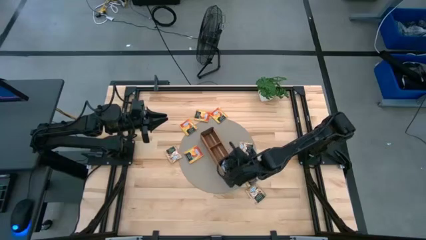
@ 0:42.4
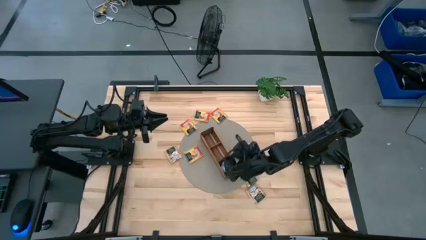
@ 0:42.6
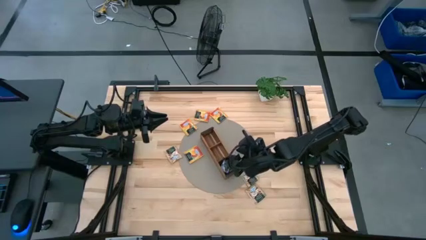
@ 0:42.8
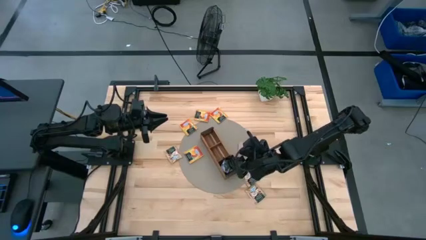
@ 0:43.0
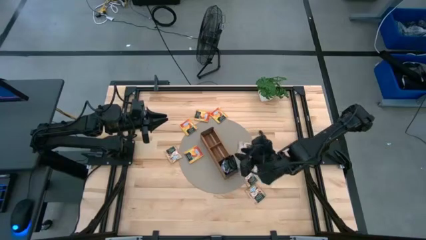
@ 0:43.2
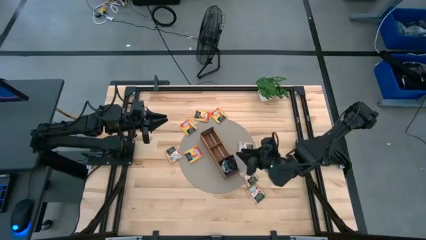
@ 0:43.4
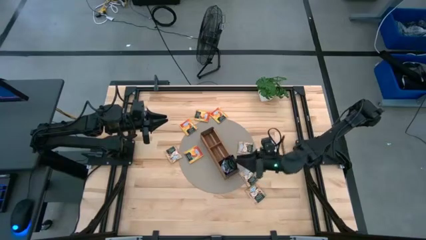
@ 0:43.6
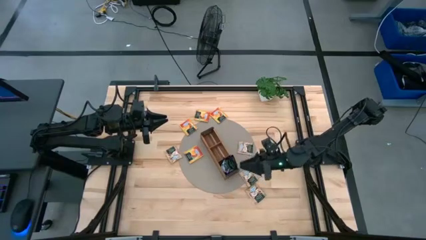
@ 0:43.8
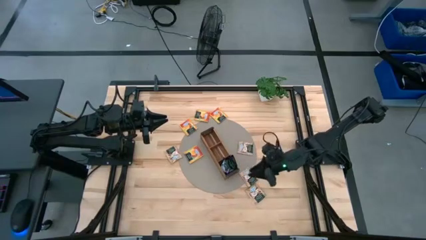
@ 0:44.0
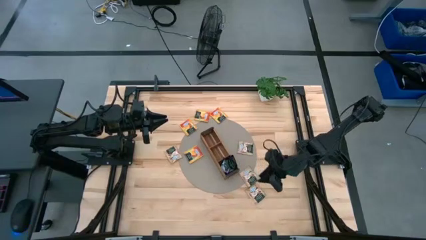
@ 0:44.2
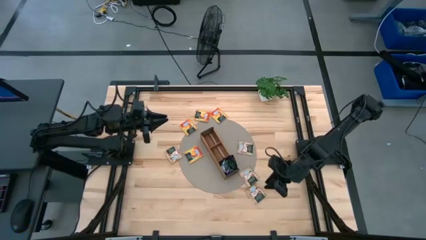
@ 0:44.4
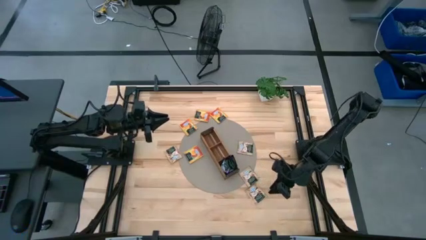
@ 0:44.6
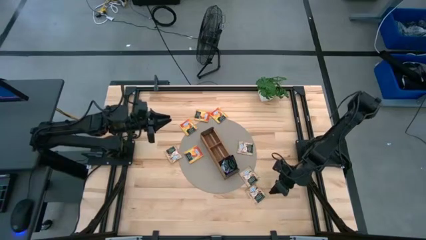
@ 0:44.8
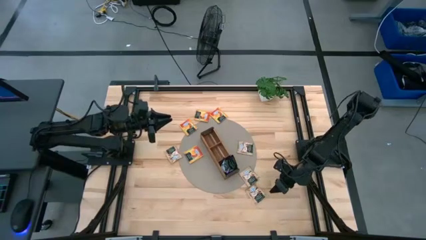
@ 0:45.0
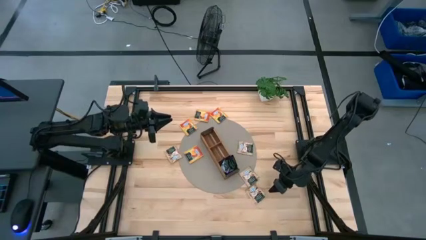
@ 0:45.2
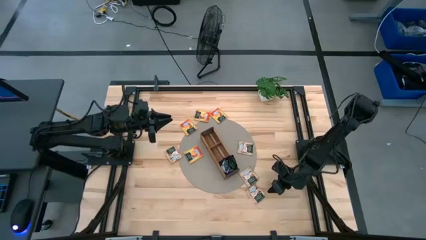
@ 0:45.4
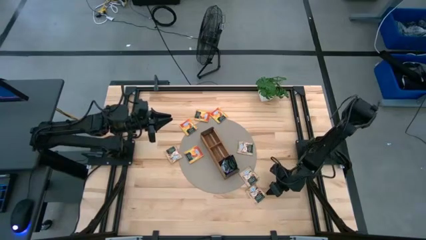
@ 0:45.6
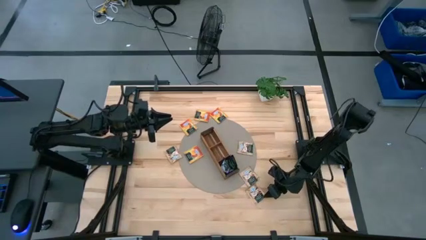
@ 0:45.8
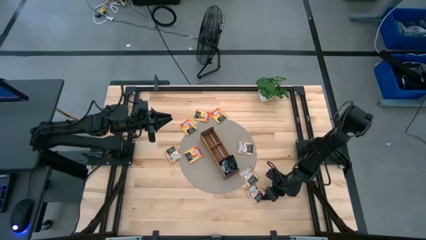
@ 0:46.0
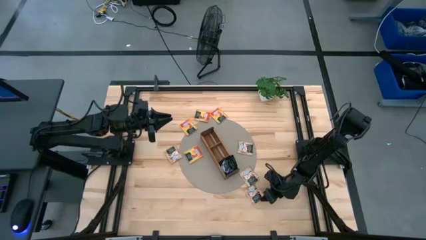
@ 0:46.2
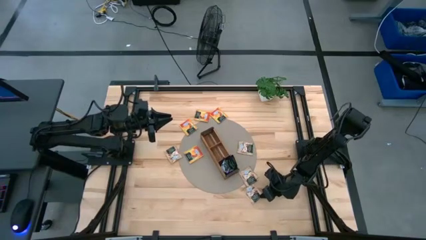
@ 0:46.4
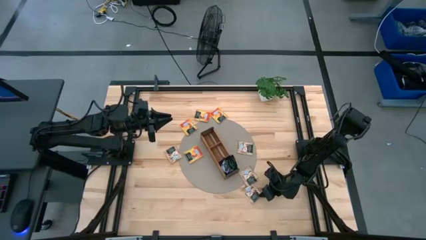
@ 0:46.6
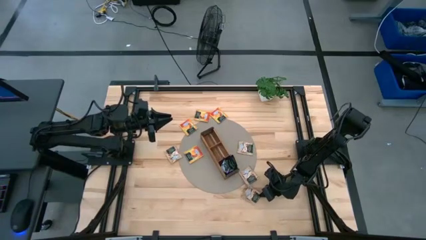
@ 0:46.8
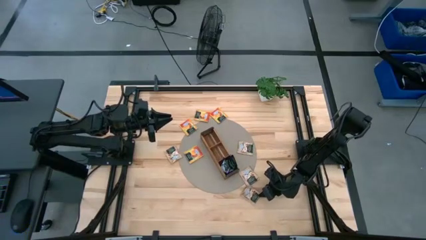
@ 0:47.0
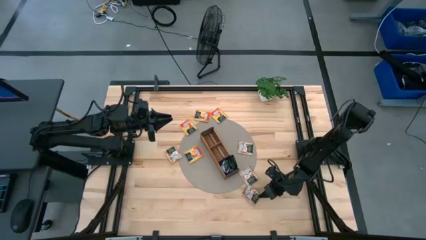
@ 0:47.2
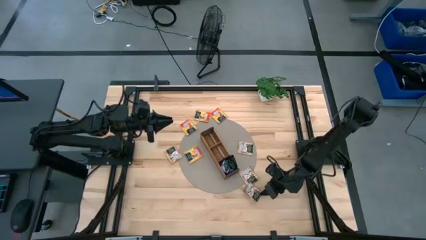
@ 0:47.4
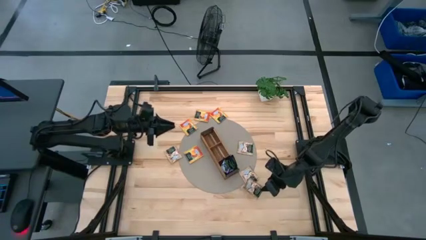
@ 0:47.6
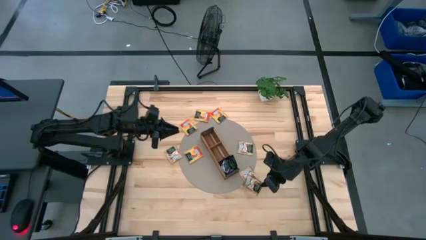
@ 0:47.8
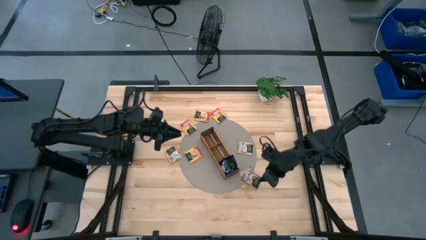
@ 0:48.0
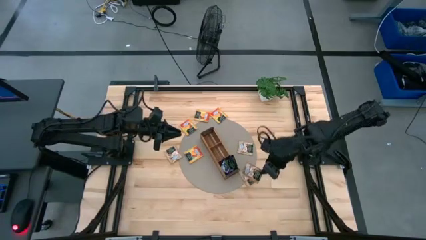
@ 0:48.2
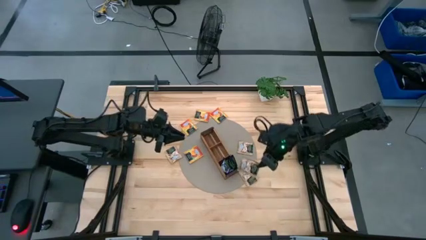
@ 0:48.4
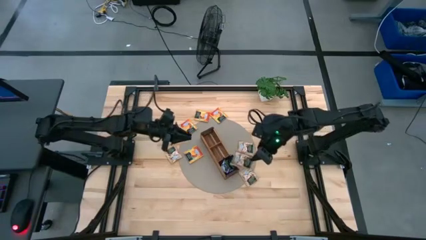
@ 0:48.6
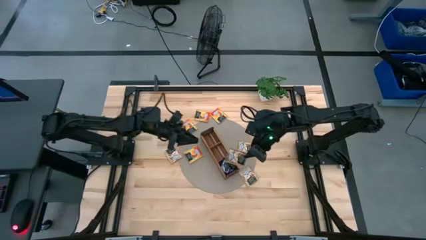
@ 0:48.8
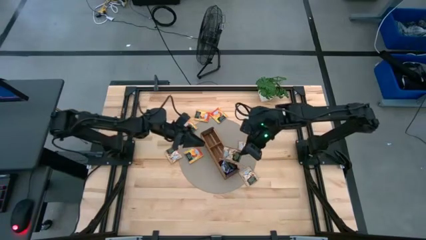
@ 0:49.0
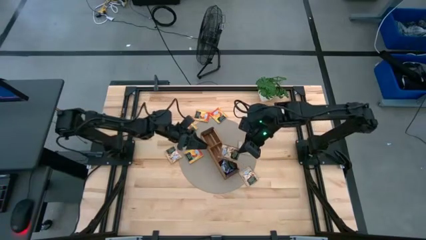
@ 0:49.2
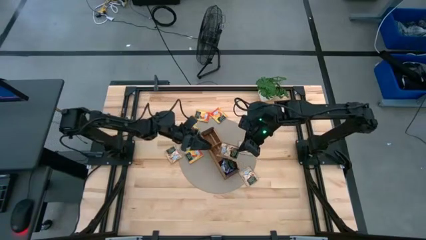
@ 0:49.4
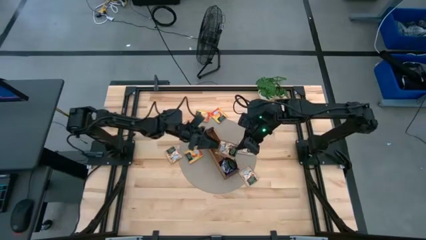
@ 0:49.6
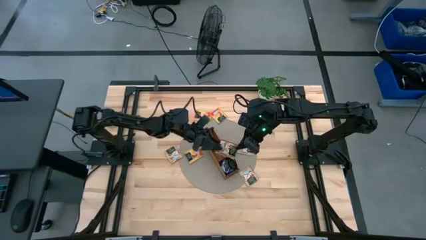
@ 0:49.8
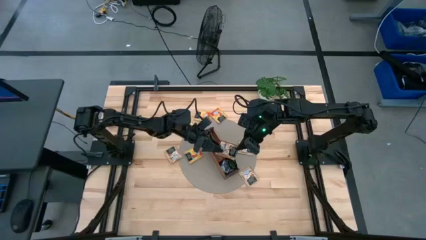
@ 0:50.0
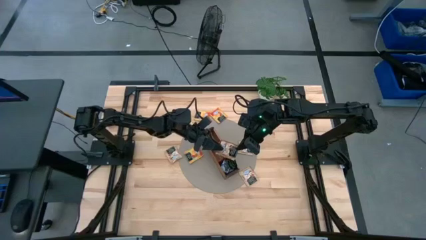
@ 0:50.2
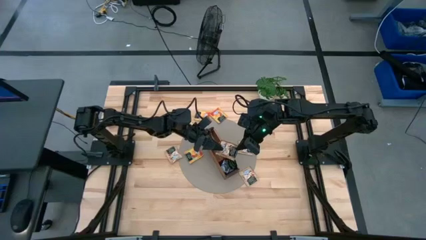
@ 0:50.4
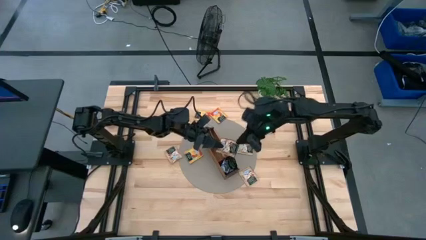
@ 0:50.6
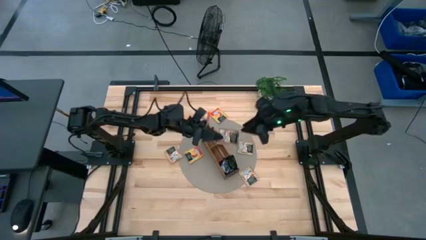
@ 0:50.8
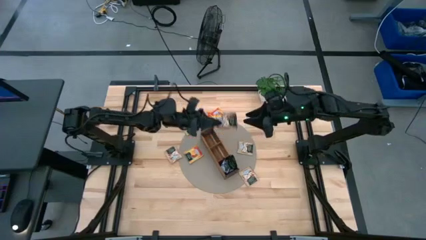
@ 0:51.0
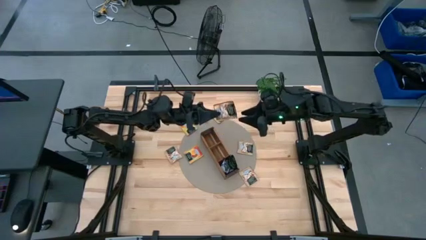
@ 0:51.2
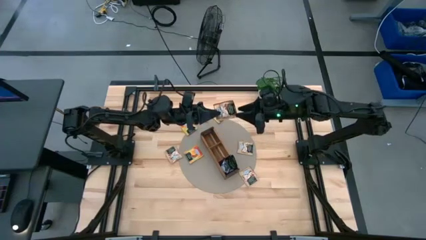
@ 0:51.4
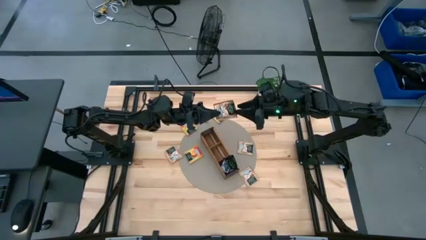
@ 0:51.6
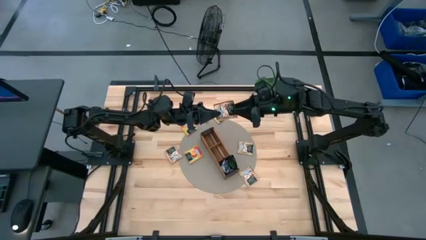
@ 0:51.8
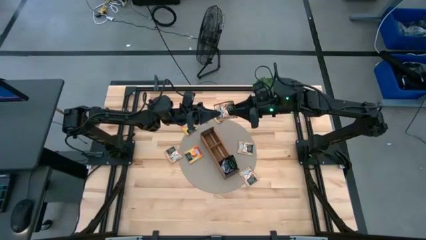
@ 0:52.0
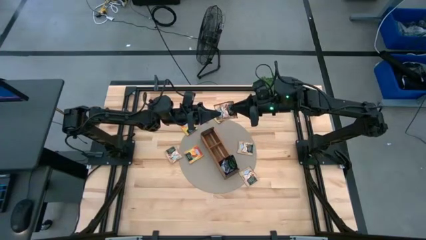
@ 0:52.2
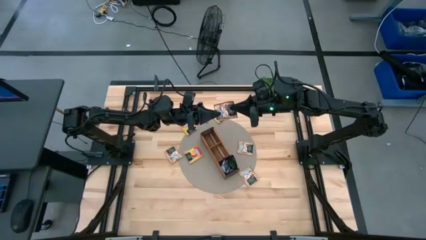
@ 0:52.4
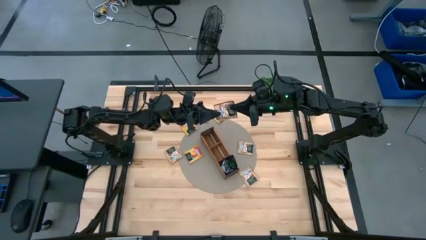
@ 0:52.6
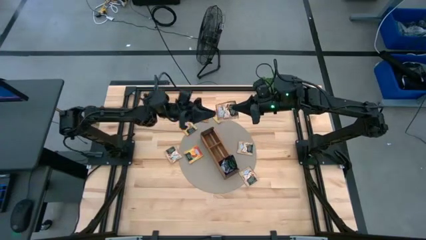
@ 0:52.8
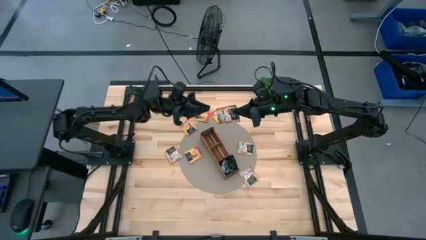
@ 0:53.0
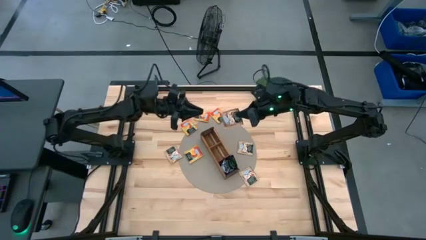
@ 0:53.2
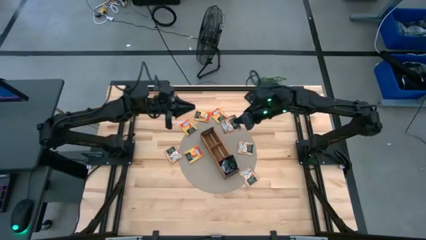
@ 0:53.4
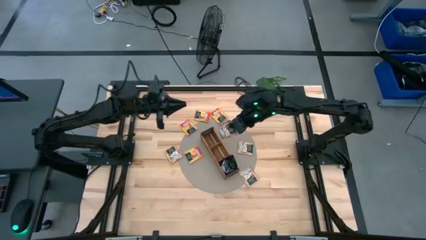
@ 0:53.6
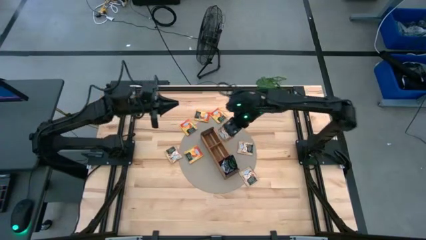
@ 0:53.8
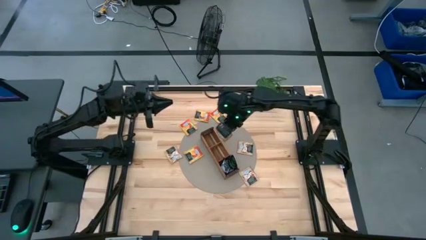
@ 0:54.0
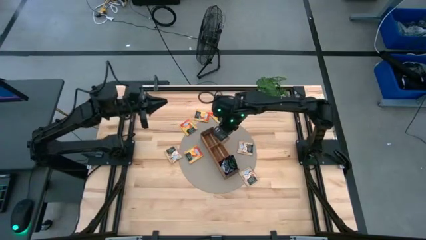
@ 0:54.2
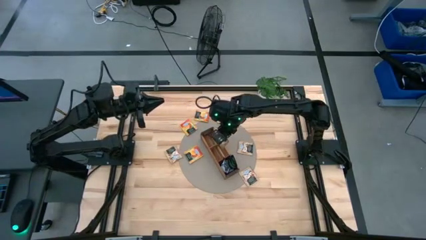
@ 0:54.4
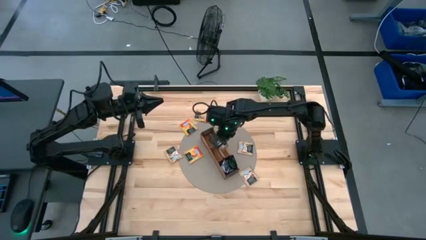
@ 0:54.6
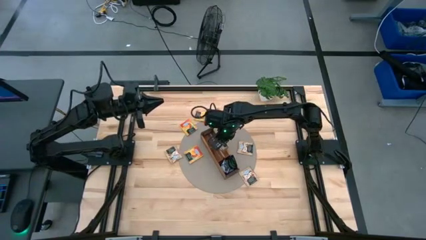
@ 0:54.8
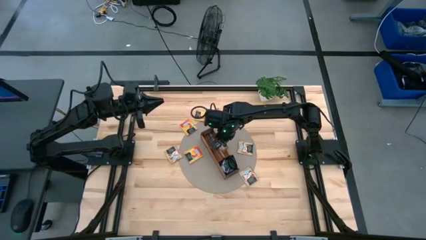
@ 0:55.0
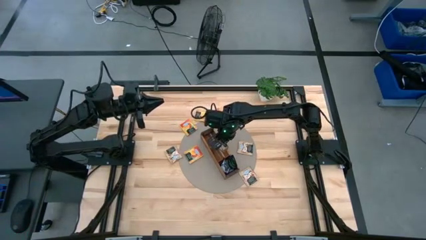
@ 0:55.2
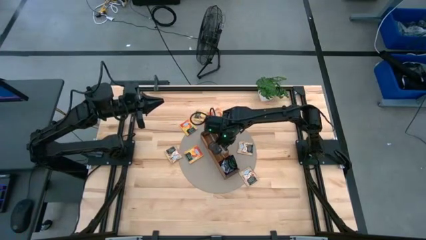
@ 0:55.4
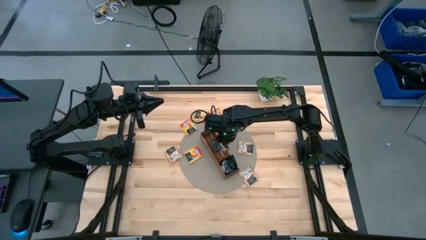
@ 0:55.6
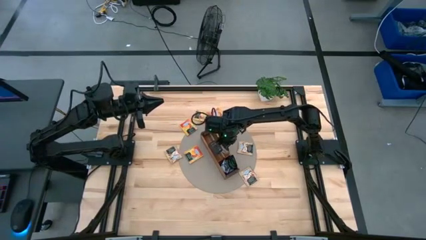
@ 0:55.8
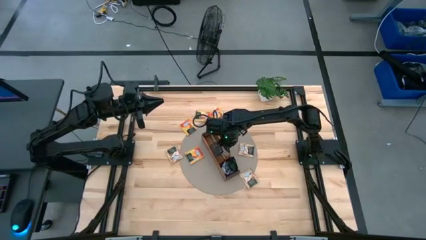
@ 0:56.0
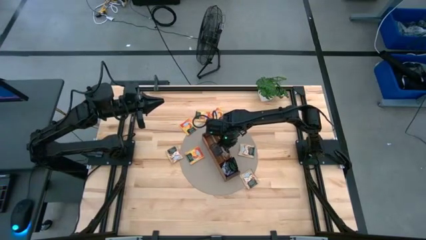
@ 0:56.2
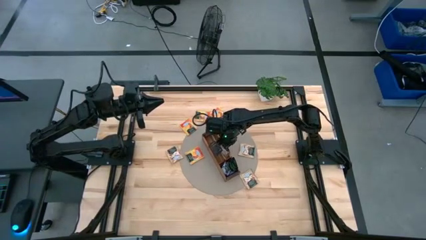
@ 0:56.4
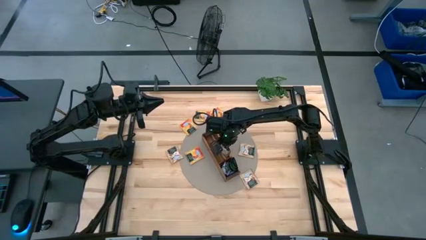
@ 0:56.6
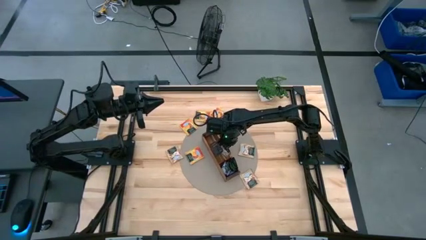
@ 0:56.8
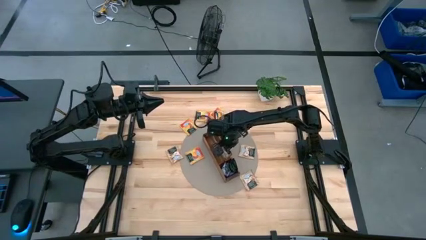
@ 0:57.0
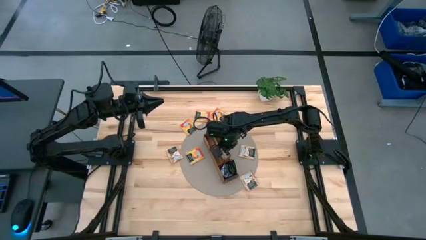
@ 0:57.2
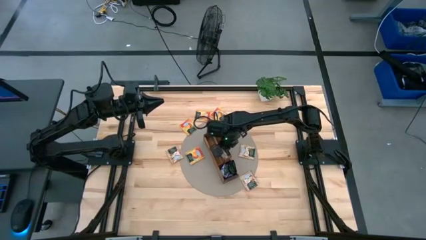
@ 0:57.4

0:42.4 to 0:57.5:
Task: Pick & Place Tea
Put the brown tea bag into the middle section of the wooden organizer

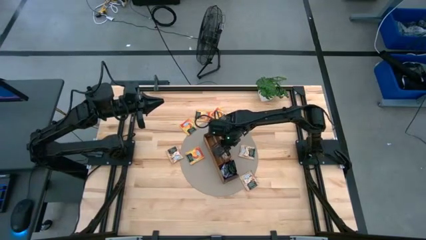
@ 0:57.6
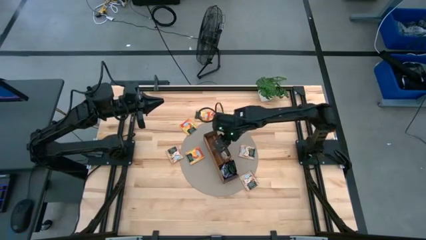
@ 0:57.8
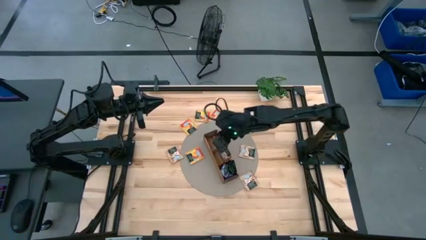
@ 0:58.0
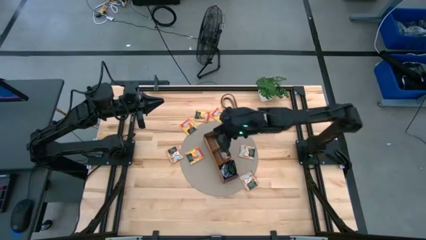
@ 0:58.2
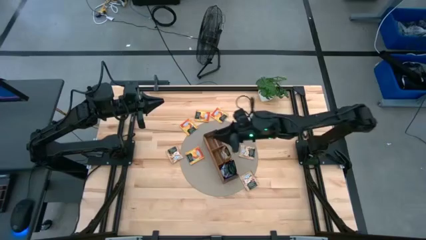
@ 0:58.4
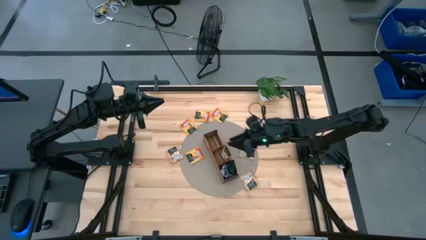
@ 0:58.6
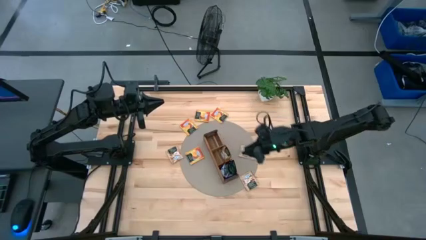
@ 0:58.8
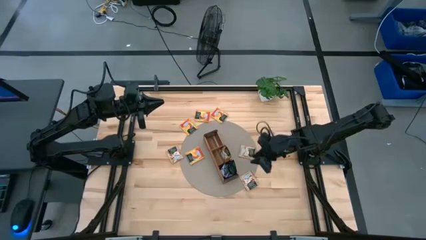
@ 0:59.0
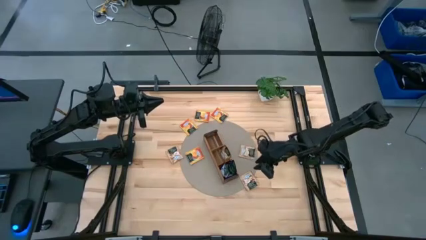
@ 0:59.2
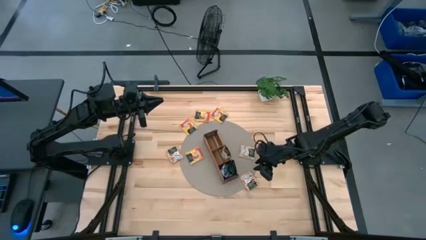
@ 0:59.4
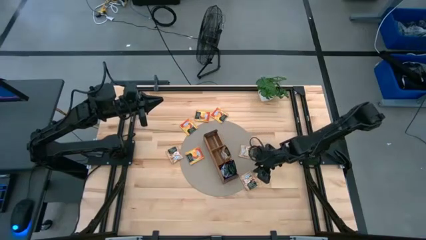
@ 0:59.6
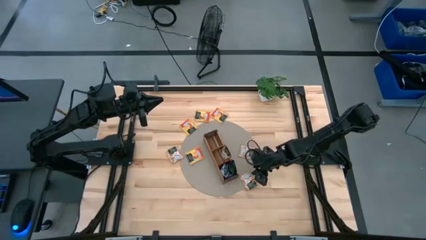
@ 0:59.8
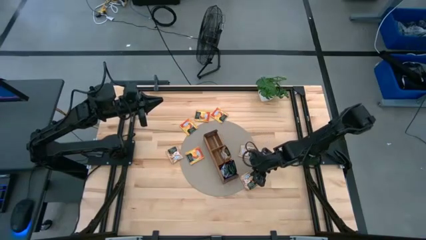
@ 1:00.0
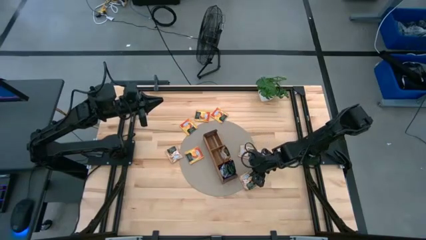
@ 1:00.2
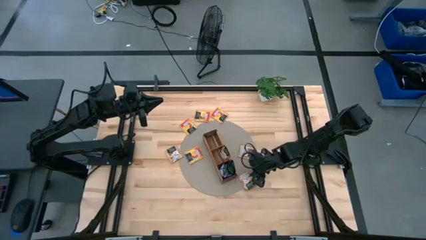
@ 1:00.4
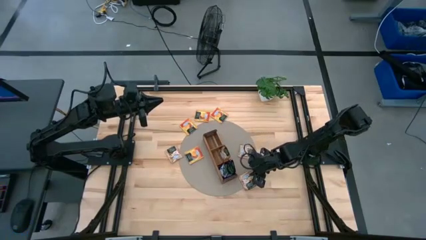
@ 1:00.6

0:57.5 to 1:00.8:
Put the brown tea bag into the middle section of the wooden organizer
